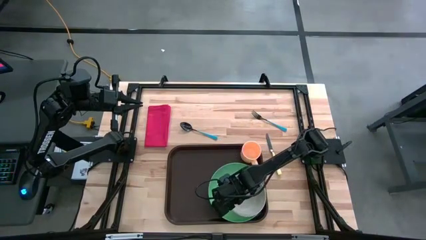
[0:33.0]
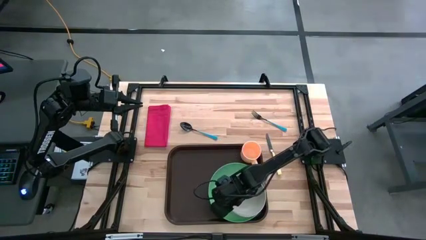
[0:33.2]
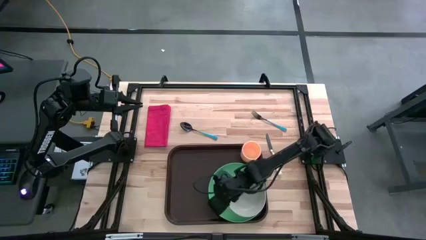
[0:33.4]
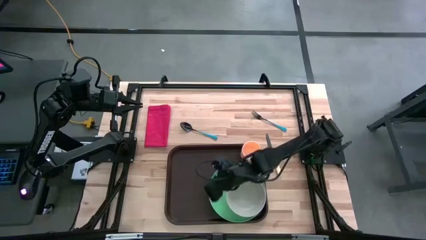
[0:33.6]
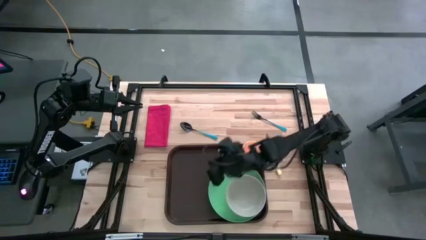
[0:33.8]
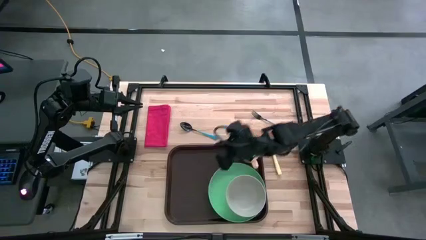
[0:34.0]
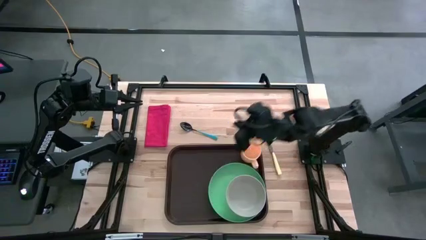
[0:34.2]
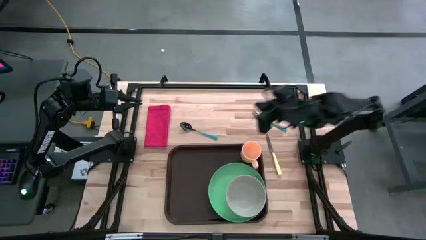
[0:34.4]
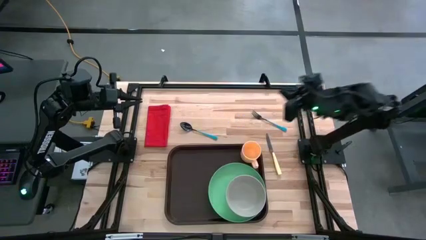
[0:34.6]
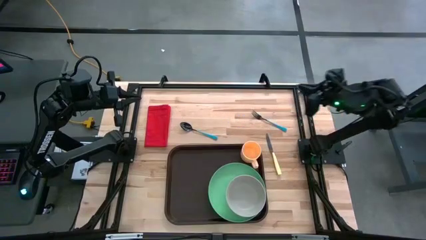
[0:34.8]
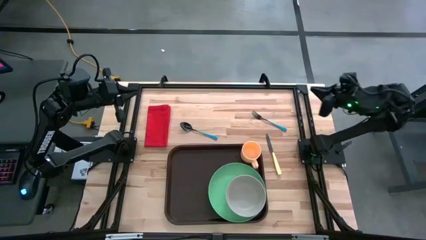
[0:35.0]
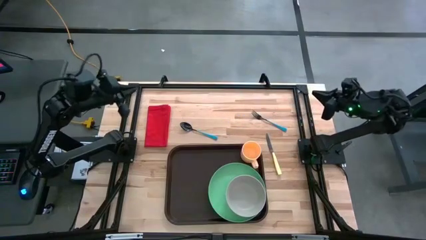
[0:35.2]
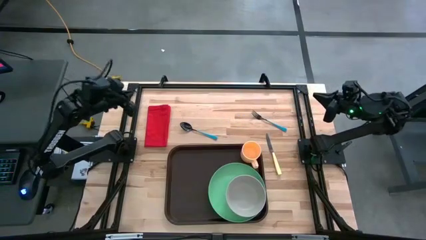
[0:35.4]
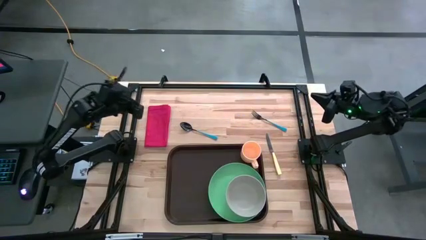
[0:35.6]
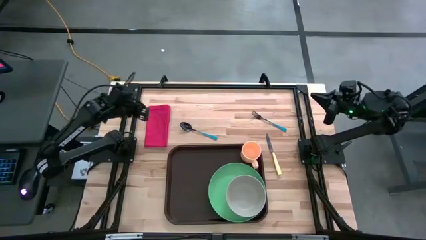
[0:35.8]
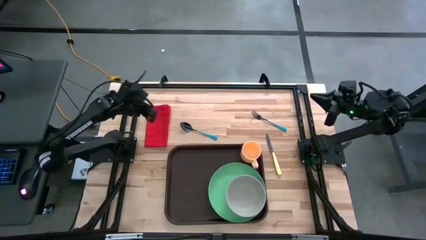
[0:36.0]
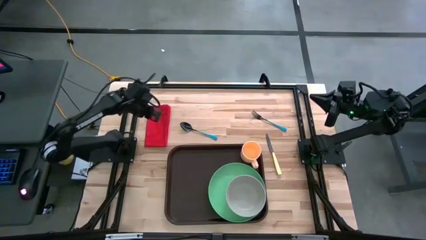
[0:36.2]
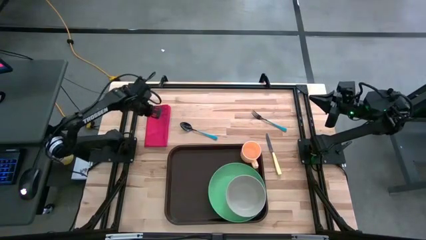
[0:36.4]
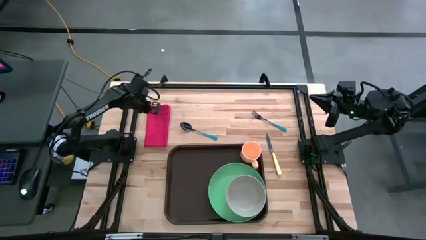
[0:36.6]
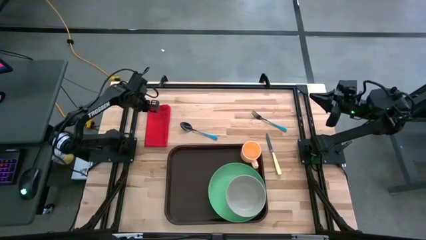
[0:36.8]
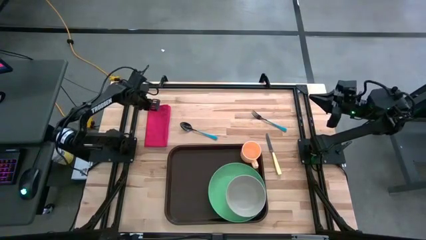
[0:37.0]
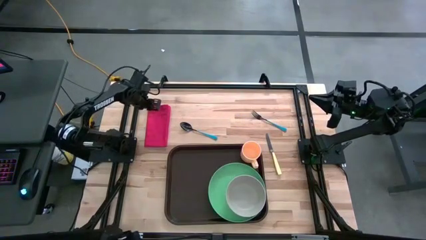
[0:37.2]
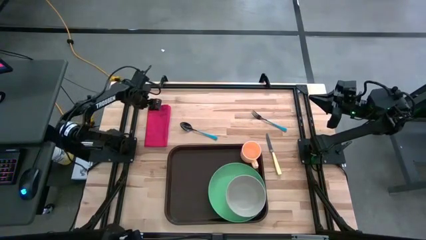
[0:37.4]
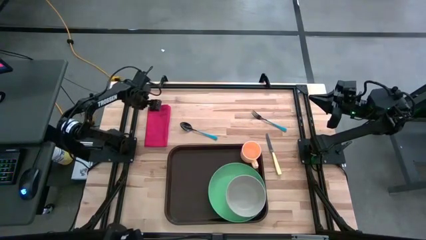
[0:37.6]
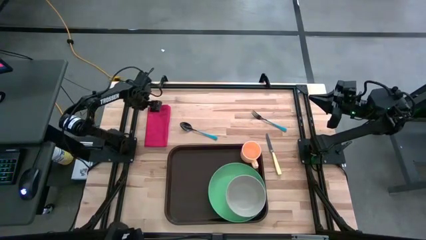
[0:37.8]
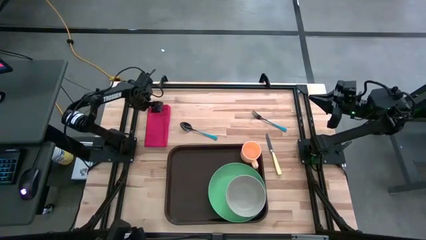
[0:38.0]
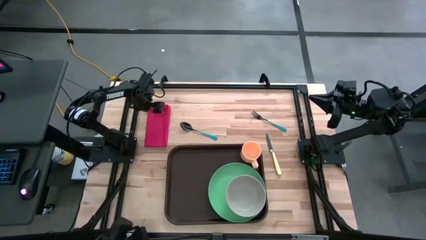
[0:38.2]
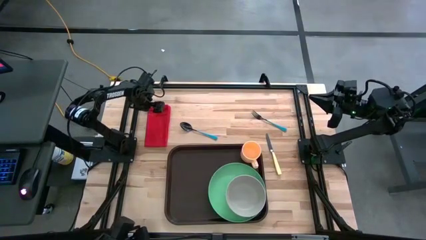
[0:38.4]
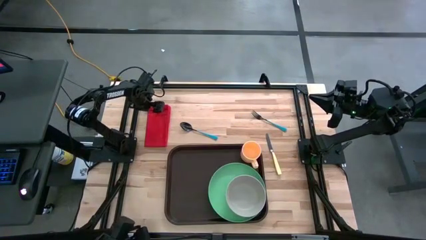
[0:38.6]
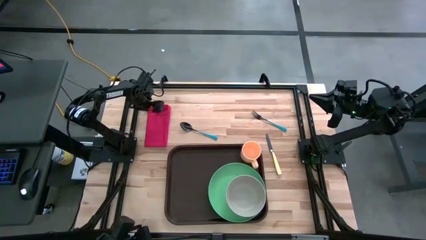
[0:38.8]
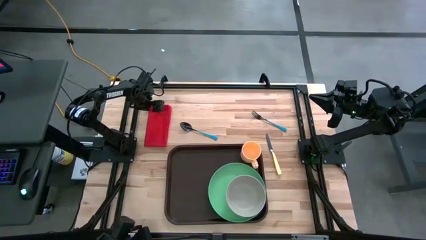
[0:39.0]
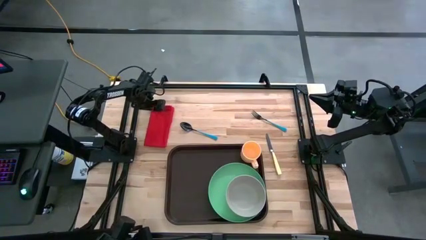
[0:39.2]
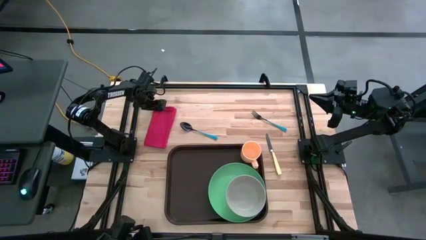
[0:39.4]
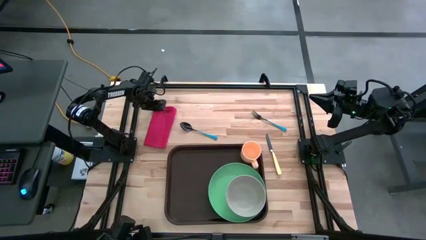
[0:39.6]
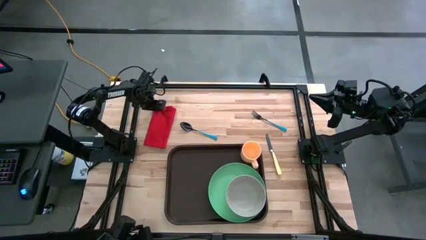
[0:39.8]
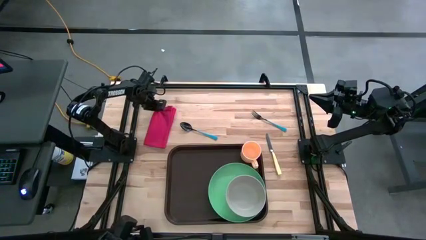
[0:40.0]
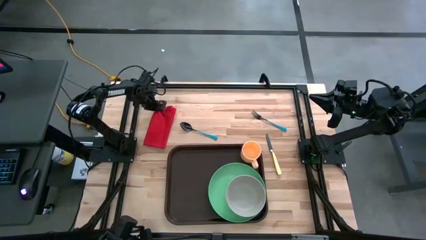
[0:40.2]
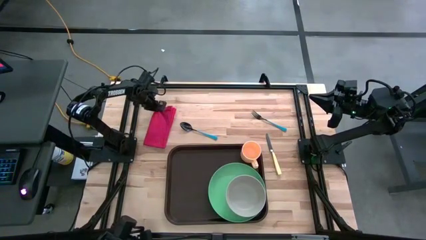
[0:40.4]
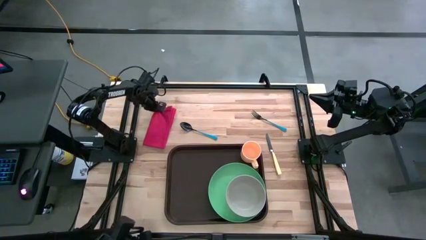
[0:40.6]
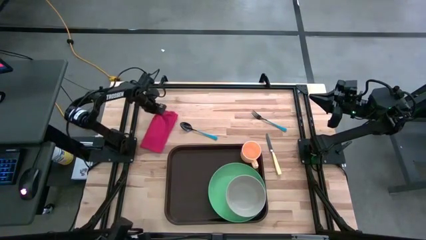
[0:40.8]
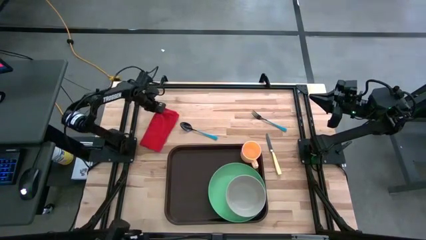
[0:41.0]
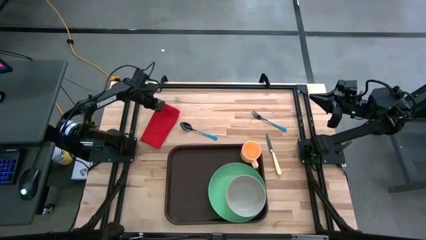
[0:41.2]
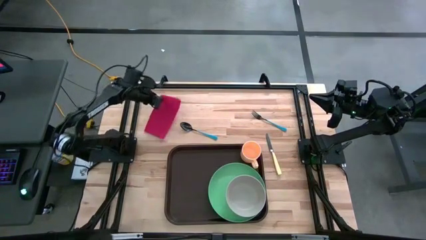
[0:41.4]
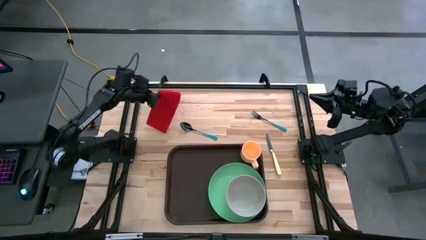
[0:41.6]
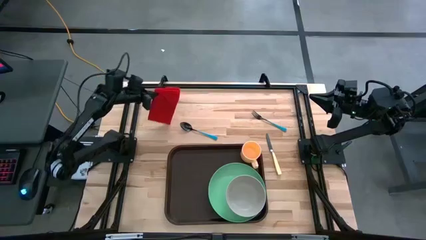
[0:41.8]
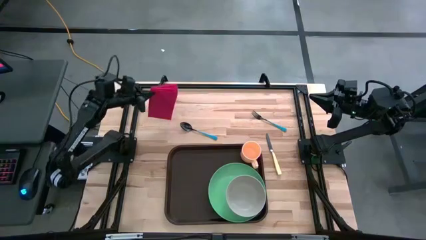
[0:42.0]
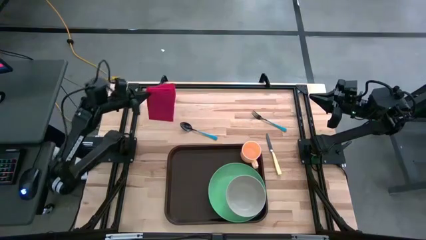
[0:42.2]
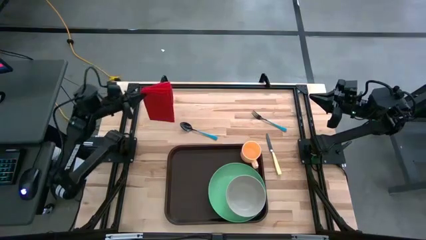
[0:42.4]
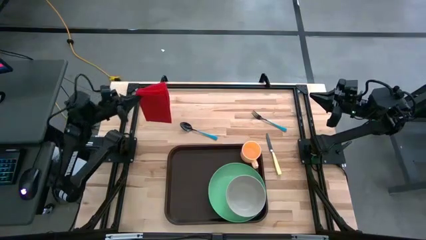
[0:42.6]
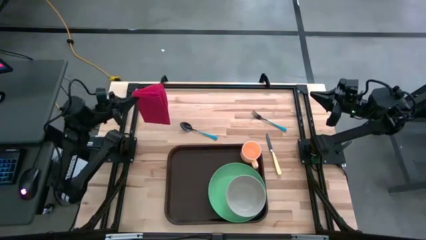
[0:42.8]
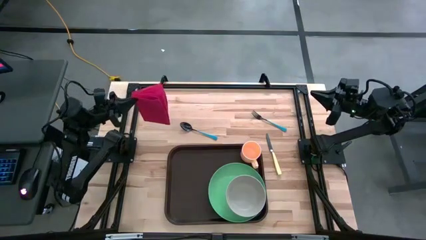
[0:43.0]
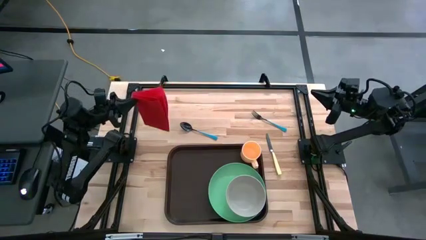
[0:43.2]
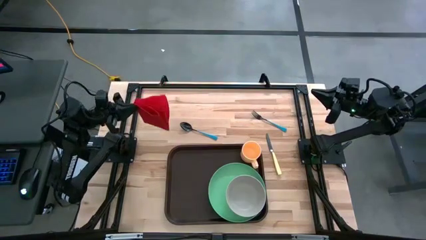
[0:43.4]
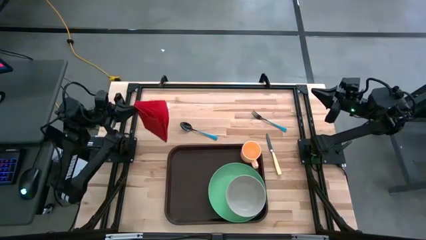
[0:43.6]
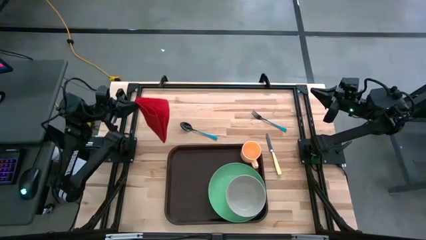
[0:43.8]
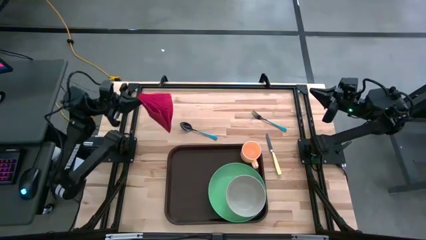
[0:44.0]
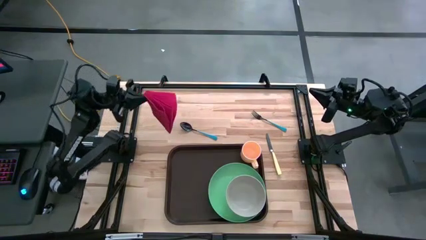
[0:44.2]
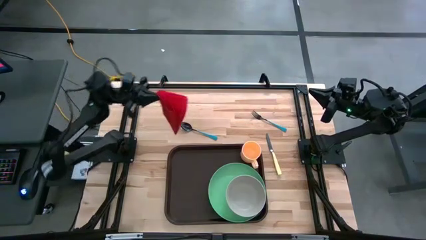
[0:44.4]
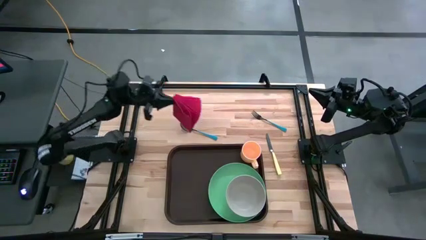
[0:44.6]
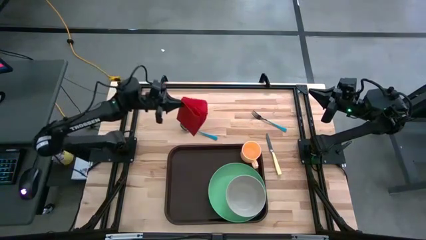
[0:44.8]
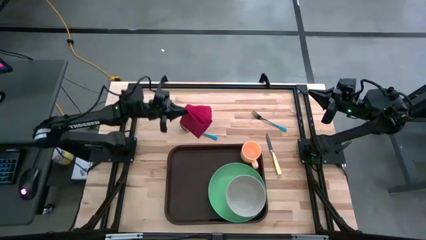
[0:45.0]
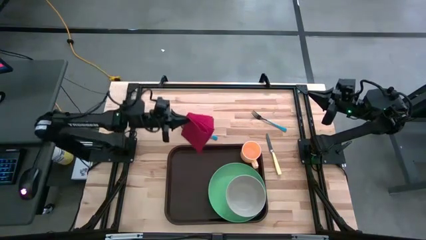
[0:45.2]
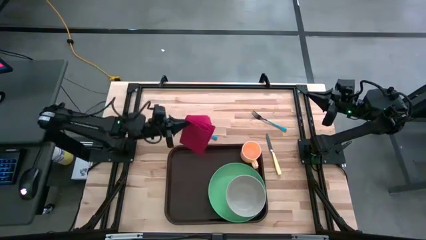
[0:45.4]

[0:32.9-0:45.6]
Task: Set up tray
Put the red napkin to the left of the green plate on the brown serving tray

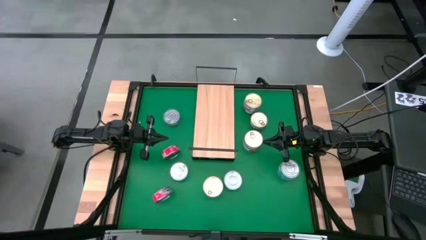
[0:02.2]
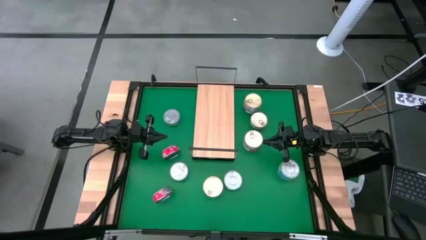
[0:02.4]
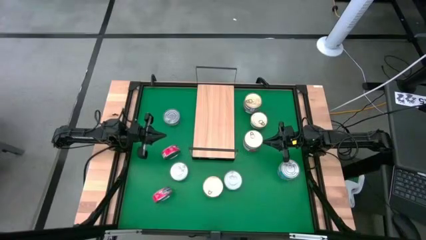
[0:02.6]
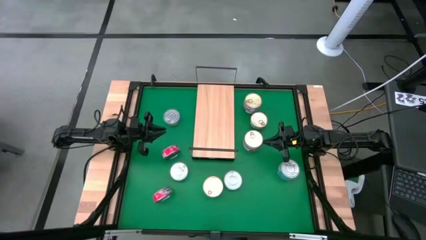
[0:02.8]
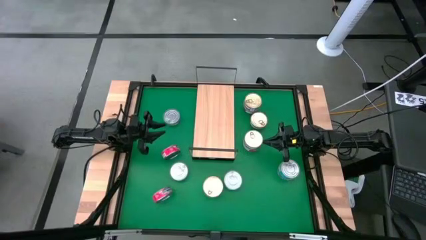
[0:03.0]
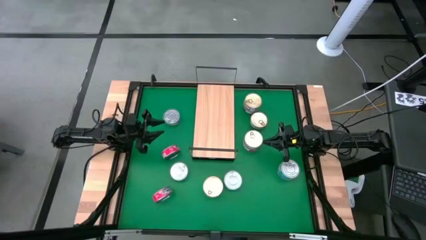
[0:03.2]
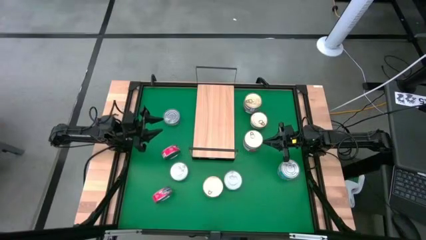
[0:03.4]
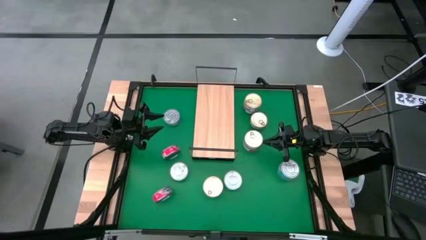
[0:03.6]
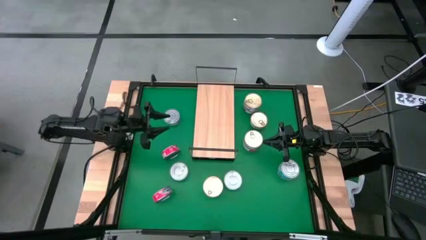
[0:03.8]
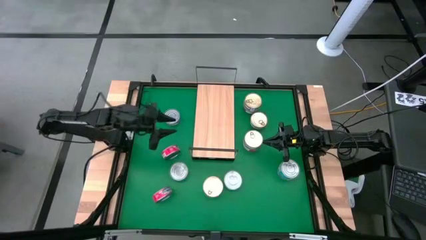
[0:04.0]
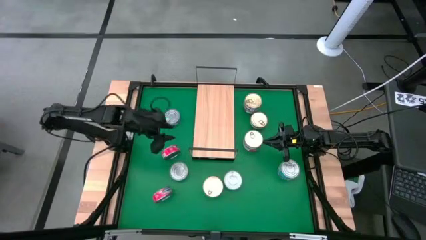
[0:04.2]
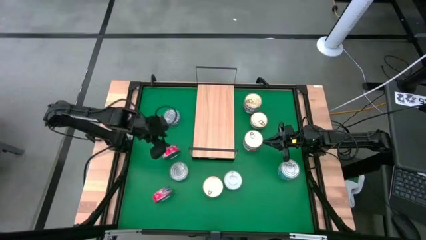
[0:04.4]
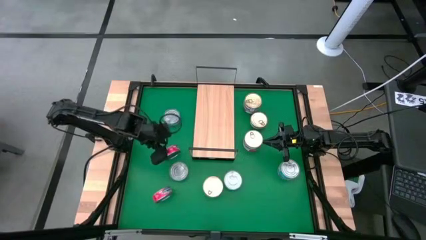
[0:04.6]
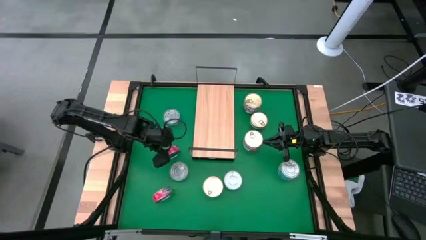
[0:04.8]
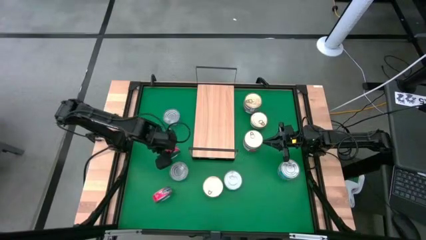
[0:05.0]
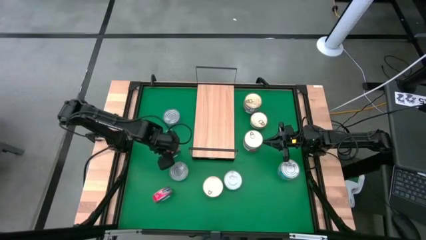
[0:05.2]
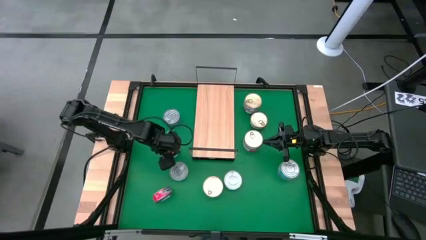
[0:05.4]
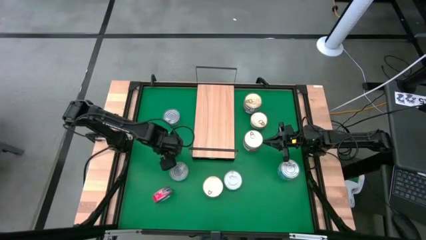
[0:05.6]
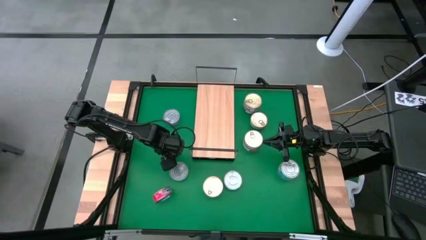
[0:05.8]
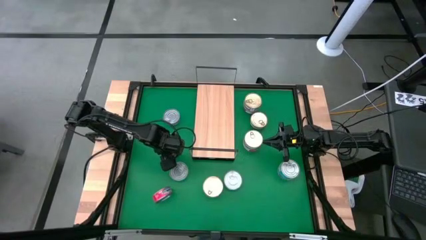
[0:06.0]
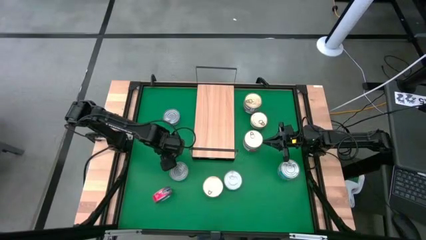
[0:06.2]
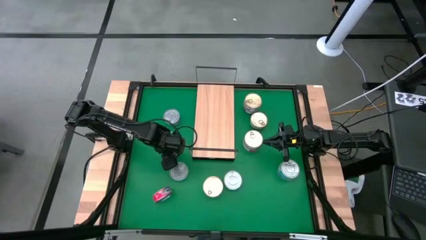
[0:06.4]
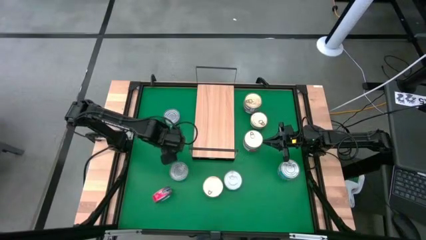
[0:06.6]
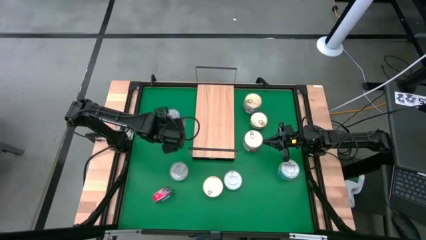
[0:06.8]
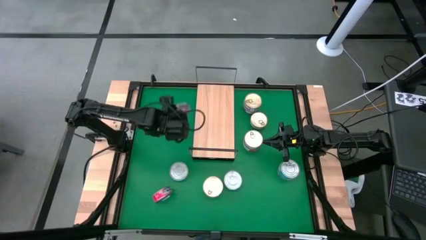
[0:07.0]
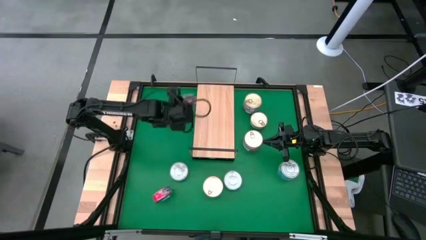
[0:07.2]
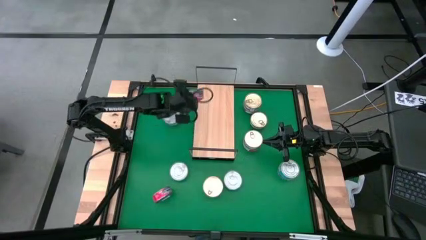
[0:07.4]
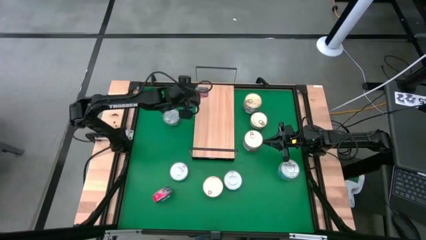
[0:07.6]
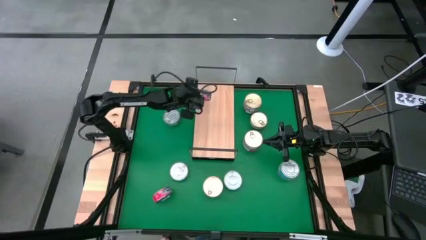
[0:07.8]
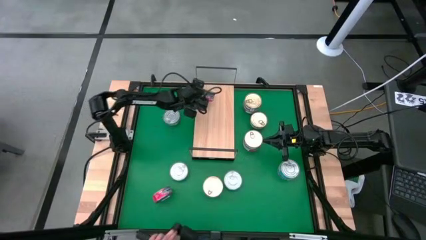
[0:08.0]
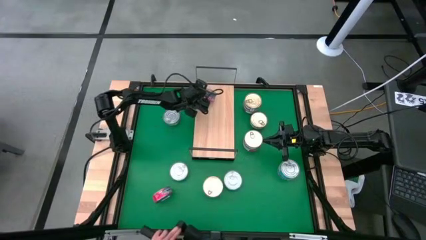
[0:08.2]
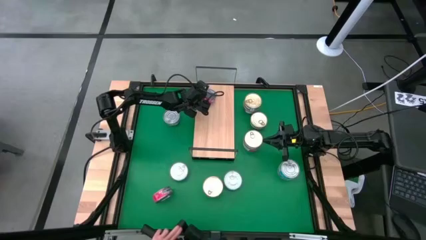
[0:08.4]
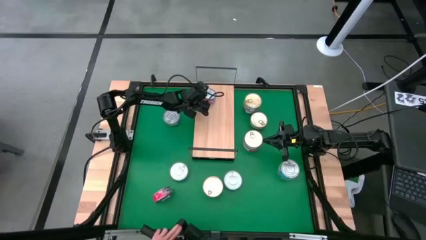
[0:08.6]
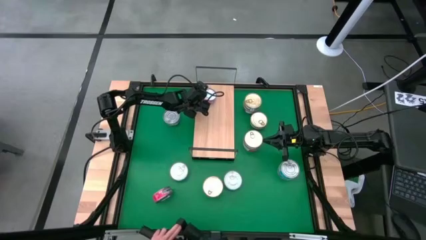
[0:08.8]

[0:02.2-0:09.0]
Task: Stack canned seafood by type on shelf
Put the red tuna can on the shelf
